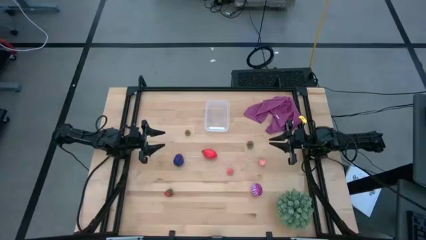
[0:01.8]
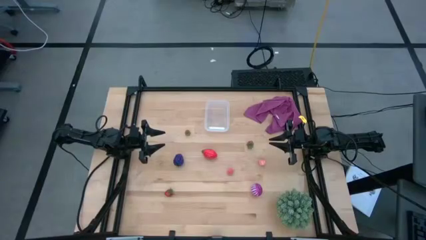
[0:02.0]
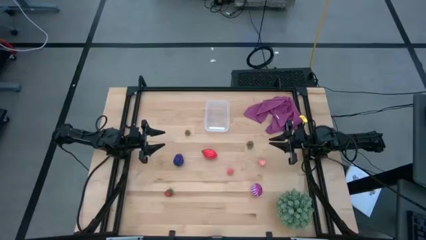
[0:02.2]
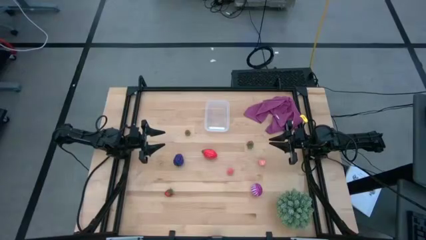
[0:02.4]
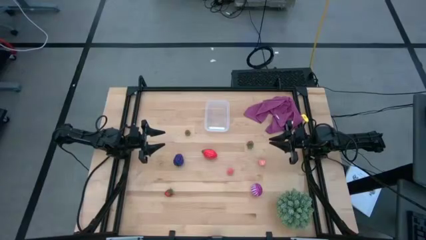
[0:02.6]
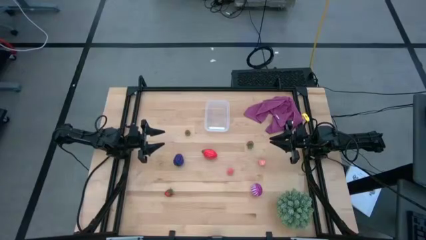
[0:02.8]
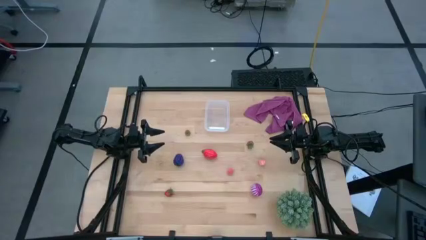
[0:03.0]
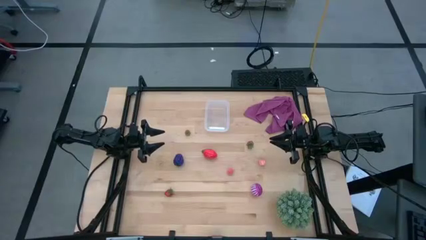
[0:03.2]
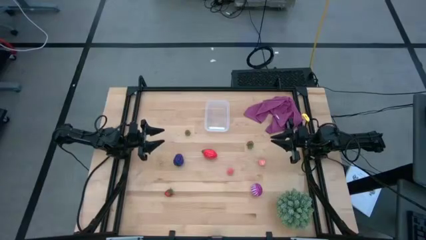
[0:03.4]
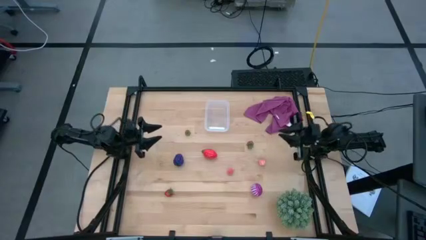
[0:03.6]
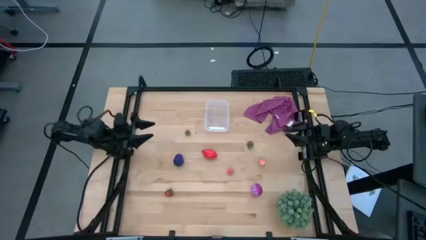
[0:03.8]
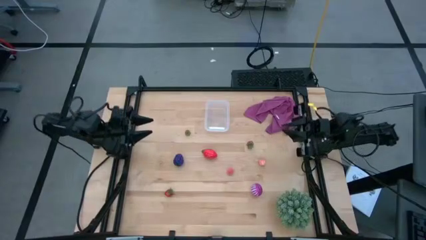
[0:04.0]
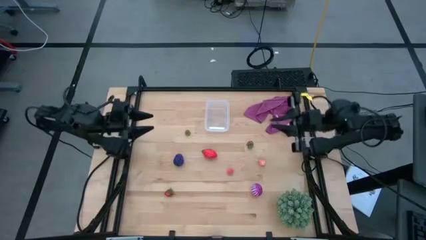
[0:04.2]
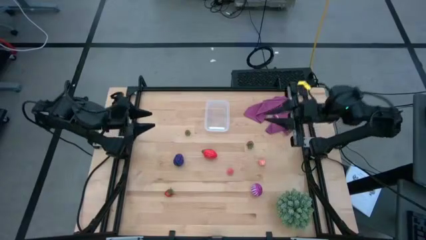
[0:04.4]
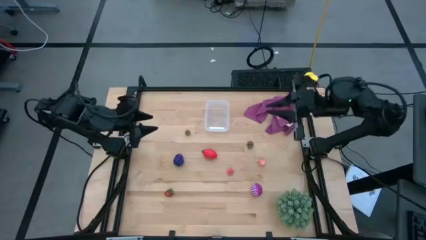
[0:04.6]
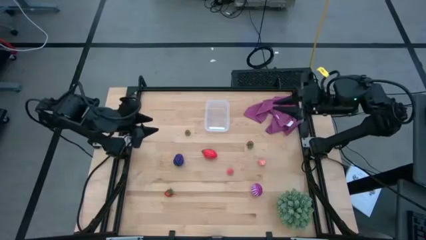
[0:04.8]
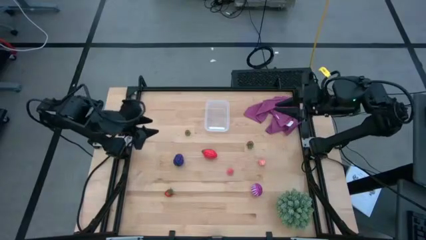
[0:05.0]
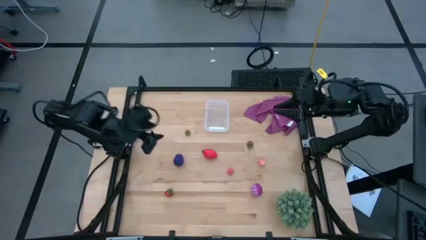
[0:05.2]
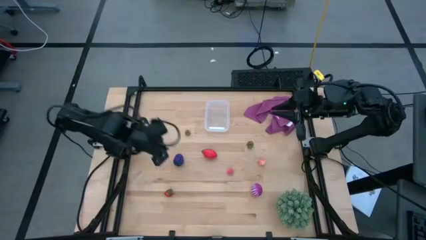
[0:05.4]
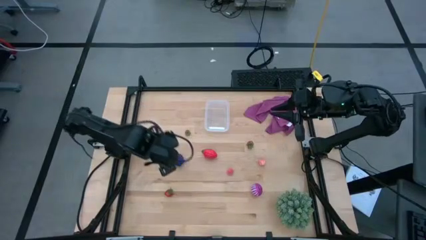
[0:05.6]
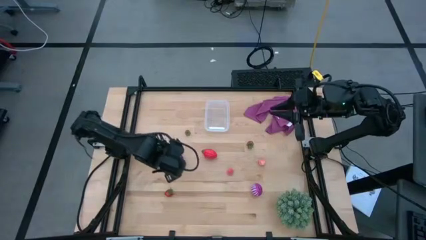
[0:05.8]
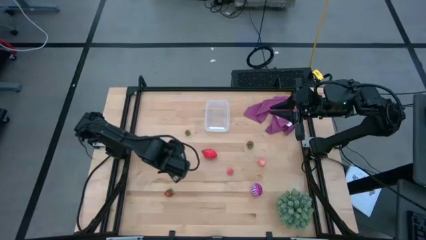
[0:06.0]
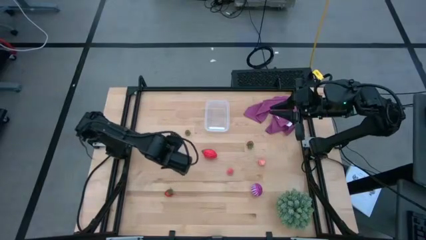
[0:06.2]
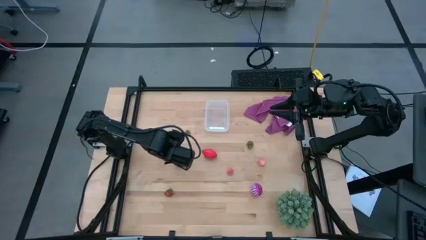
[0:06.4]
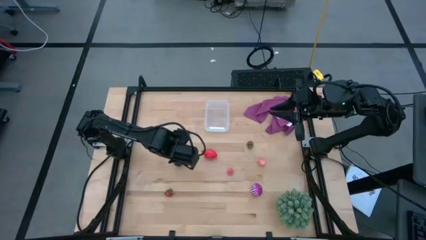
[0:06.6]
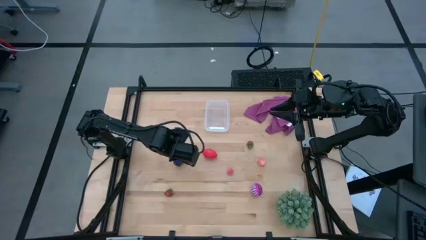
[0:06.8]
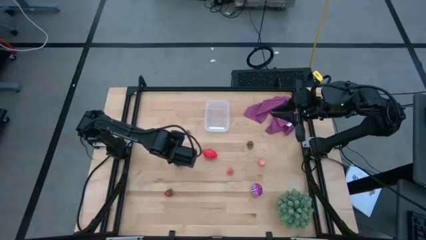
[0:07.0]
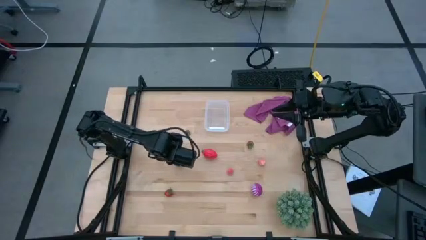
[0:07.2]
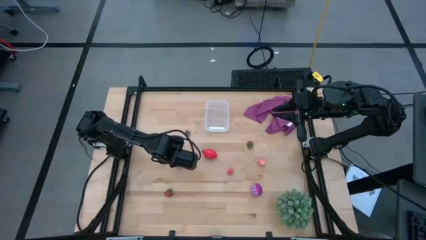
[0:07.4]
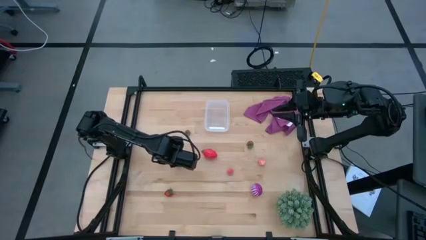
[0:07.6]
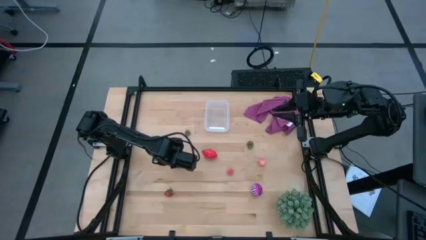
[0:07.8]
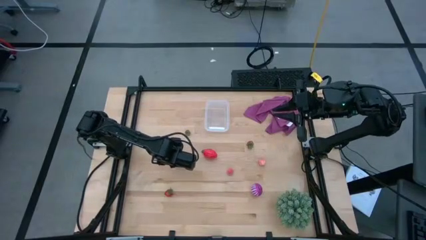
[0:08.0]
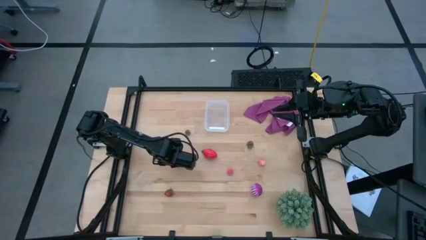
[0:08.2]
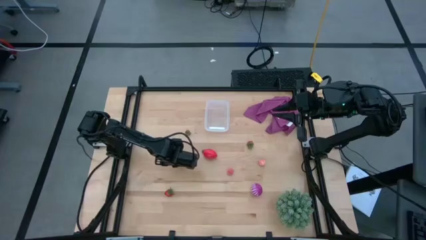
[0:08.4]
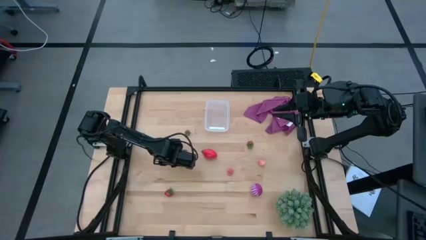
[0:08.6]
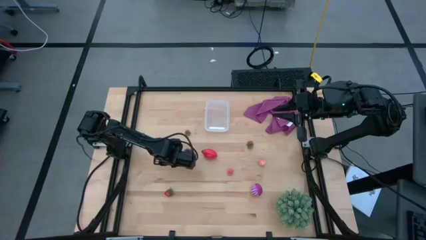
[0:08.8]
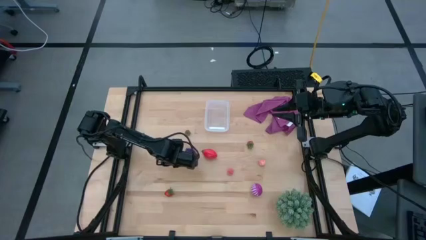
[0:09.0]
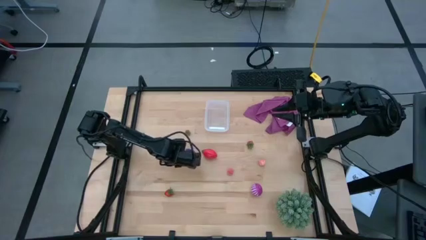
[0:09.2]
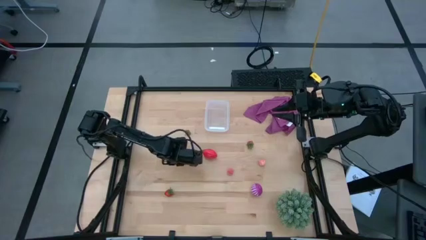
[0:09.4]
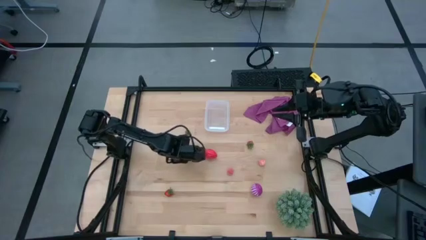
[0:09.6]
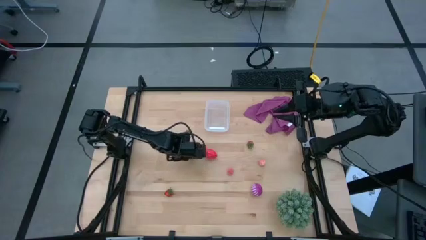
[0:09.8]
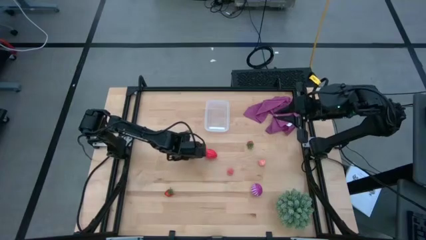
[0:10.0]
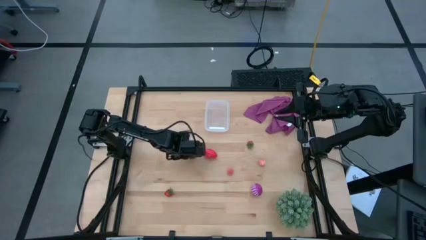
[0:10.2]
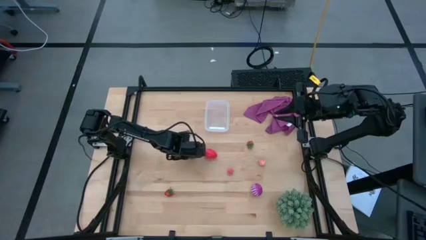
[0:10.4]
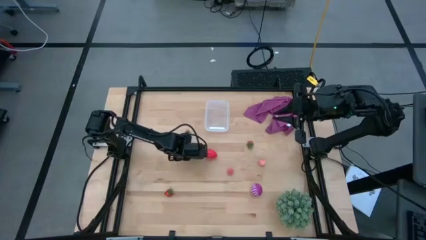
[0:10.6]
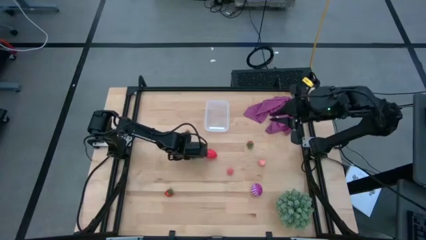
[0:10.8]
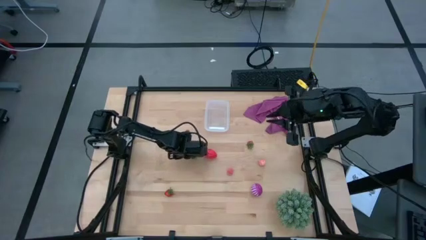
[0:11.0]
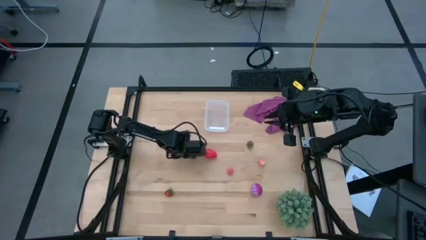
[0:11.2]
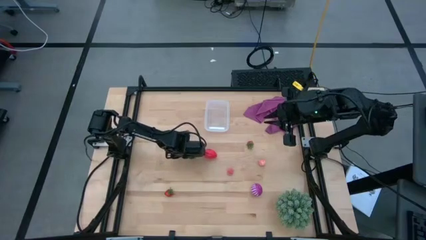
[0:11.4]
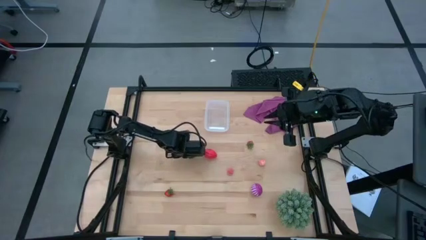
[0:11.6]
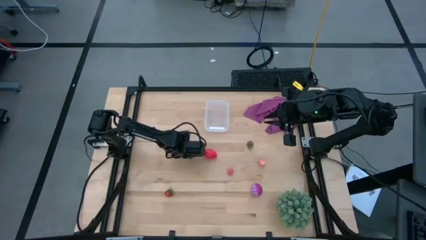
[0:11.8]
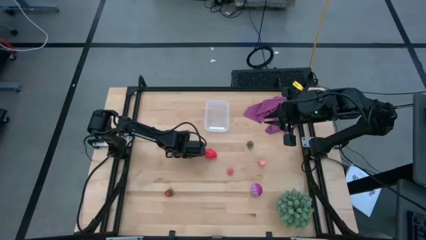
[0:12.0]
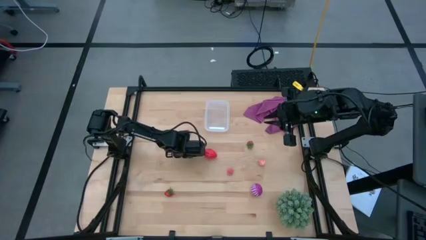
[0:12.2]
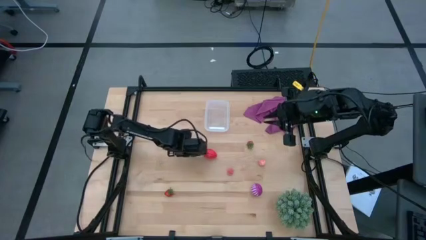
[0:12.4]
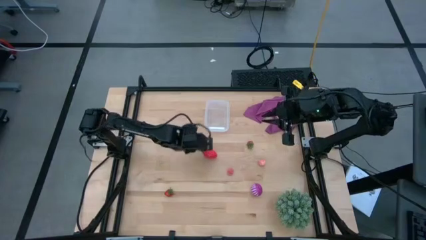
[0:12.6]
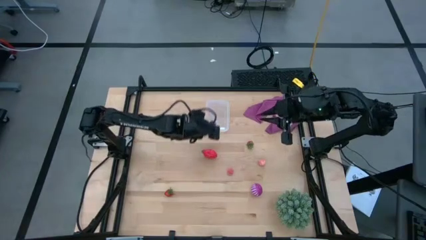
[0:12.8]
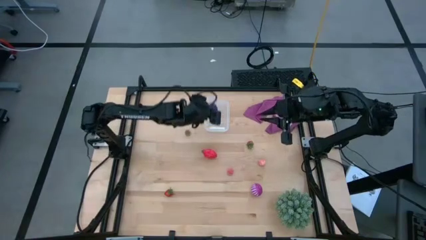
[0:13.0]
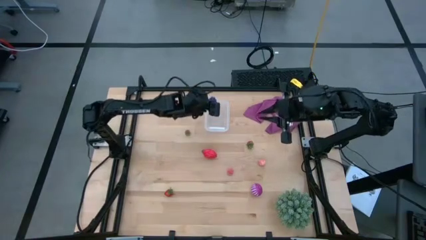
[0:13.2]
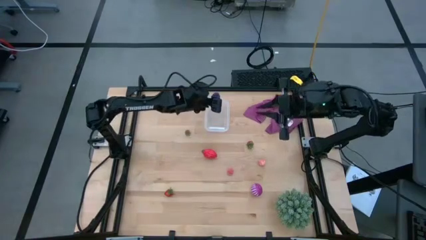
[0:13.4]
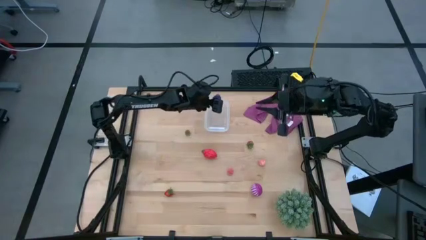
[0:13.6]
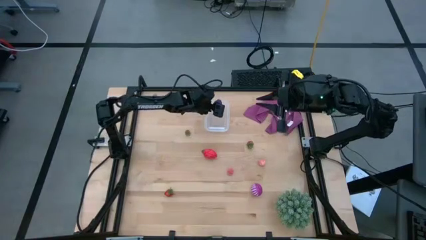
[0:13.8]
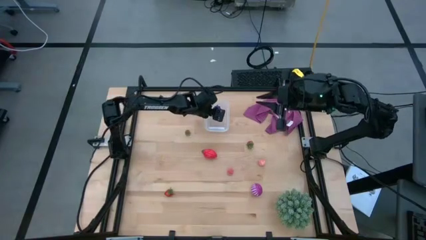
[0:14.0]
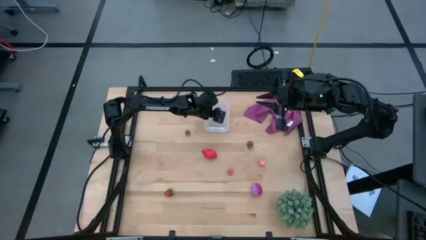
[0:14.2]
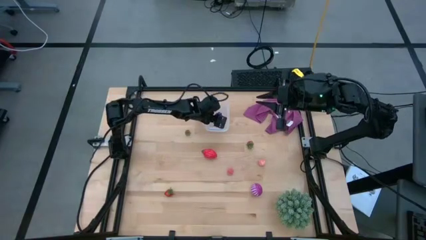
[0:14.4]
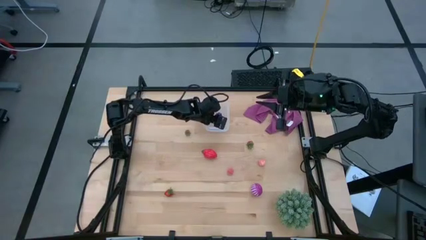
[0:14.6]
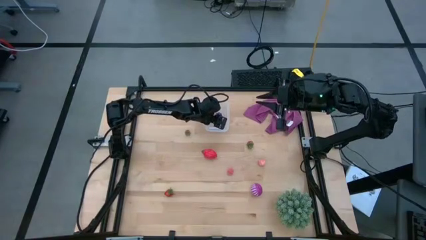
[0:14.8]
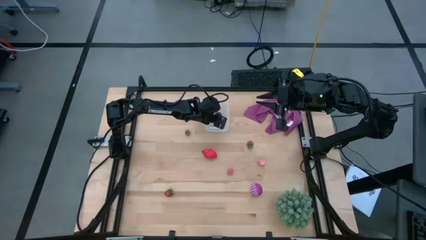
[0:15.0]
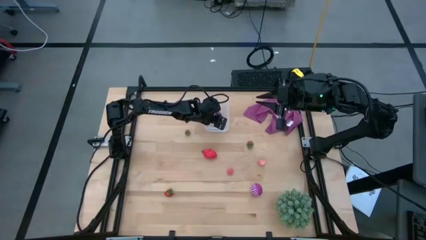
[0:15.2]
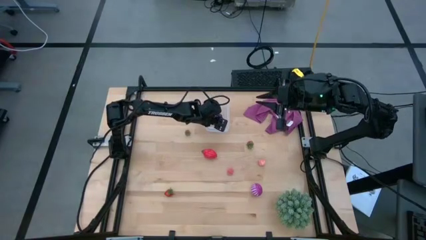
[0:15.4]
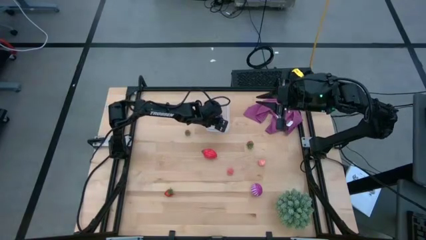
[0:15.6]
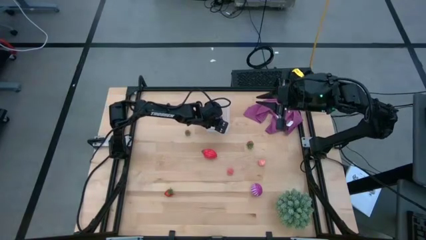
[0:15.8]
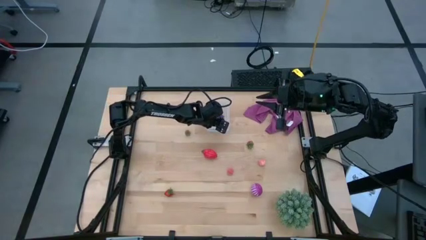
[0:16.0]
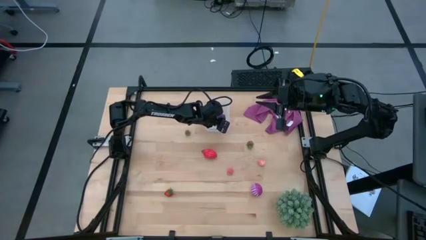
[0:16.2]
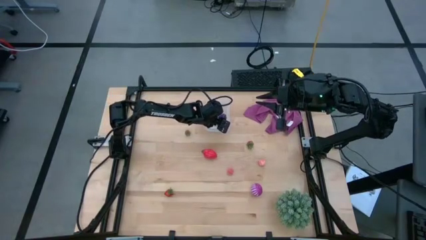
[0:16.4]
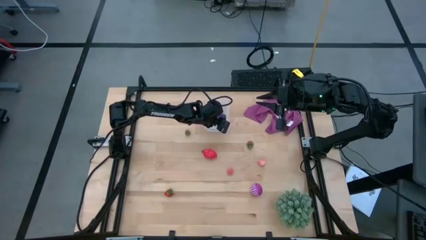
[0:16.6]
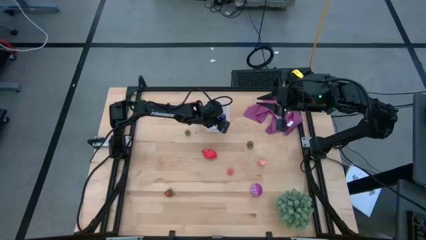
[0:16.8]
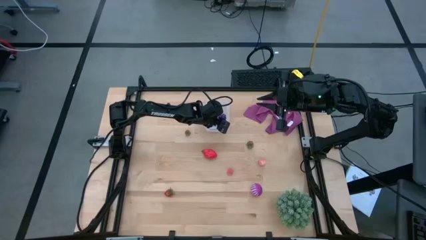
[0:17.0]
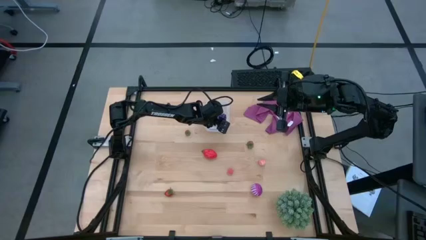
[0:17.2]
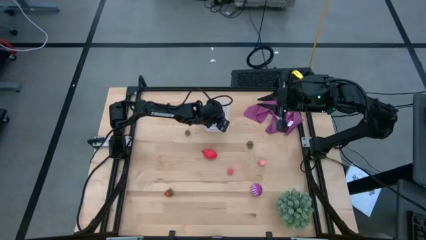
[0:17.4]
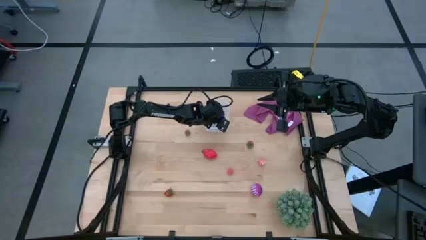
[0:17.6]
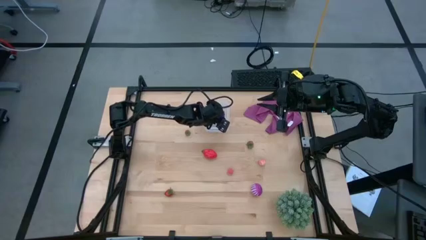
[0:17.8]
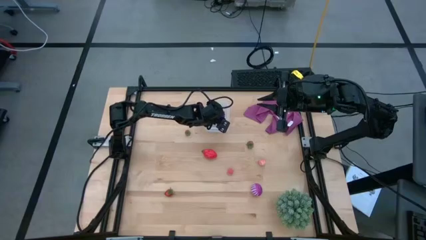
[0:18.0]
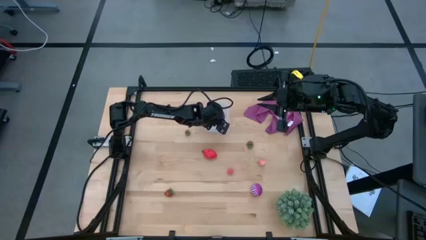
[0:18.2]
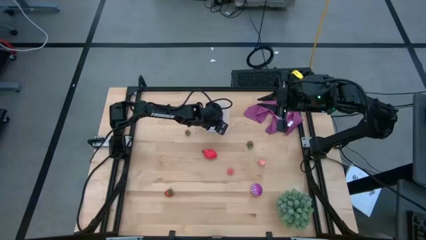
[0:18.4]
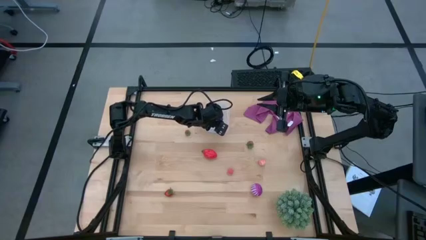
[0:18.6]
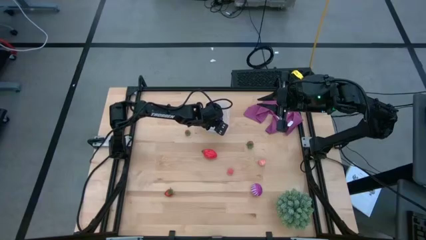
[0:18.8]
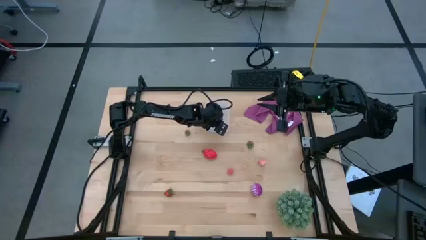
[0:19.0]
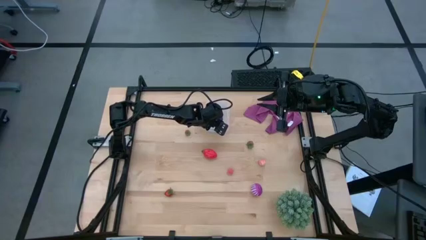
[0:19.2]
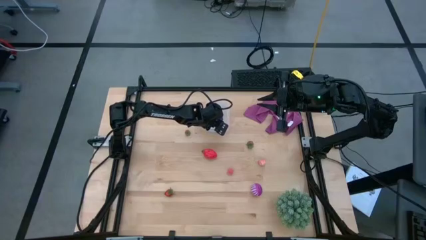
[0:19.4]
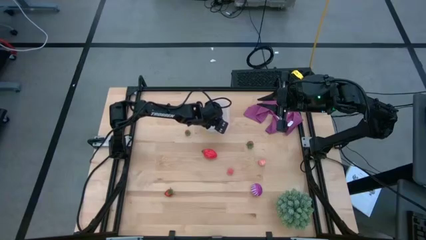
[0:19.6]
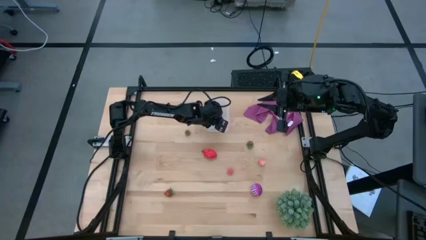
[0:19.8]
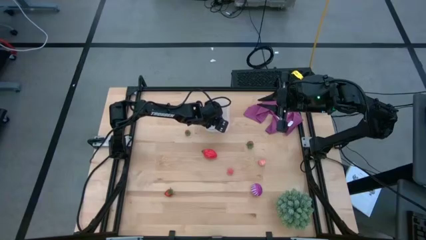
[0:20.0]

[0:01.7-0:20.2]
Task: Pick and placing Produce into tupperware
Put the blue grapes into the transparent bin
